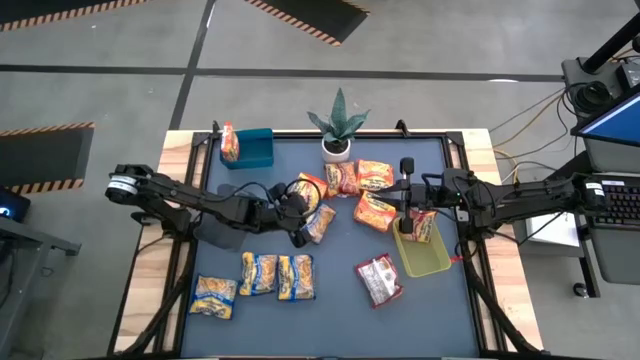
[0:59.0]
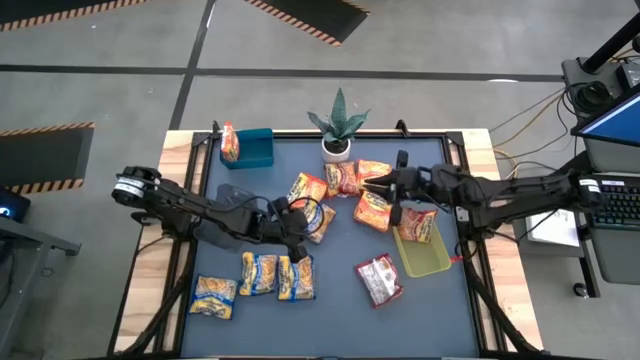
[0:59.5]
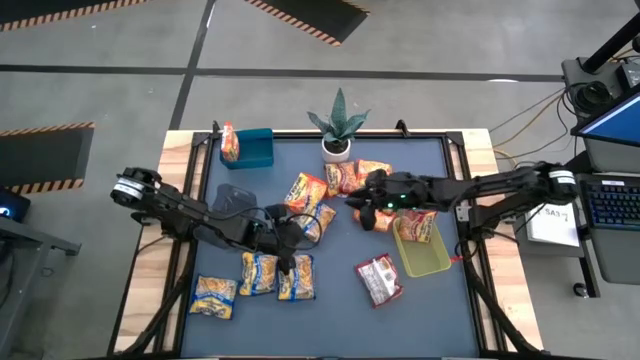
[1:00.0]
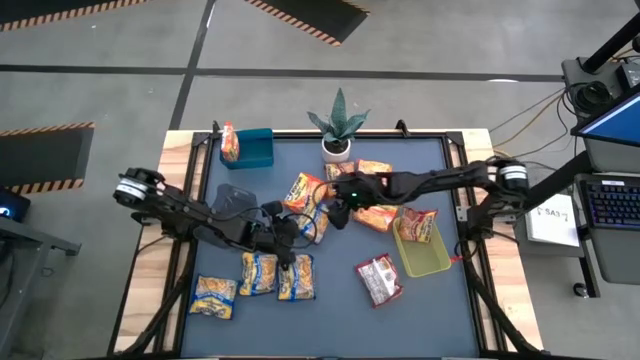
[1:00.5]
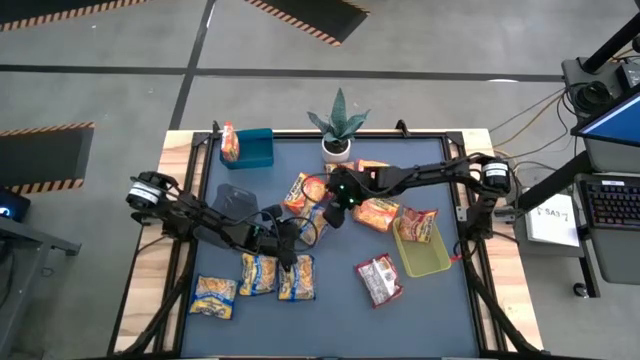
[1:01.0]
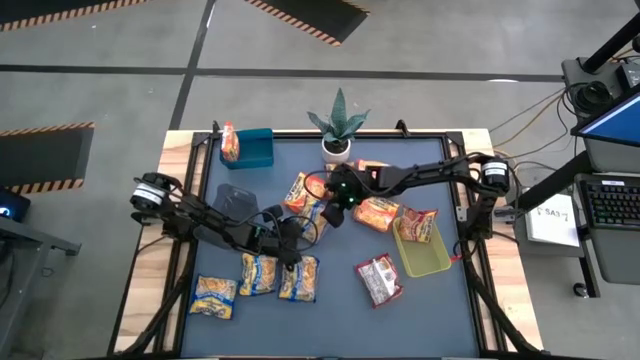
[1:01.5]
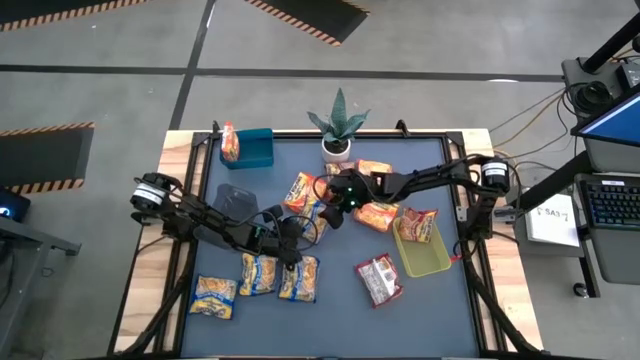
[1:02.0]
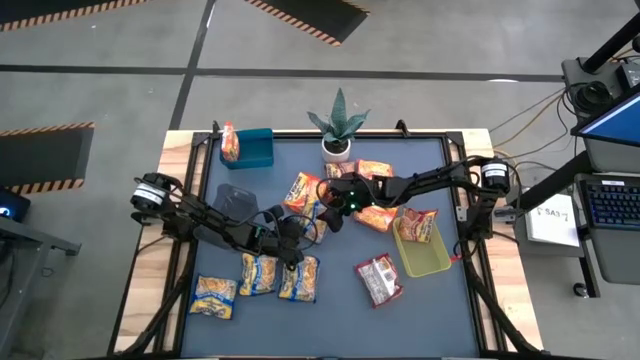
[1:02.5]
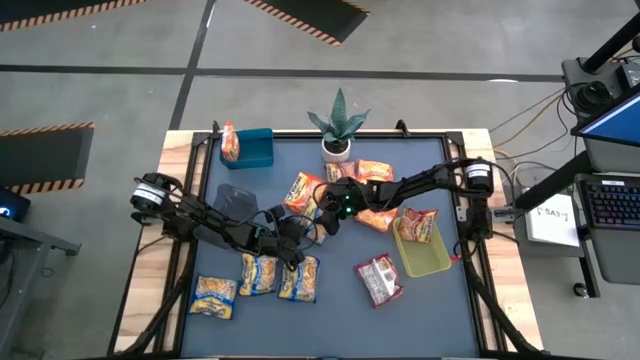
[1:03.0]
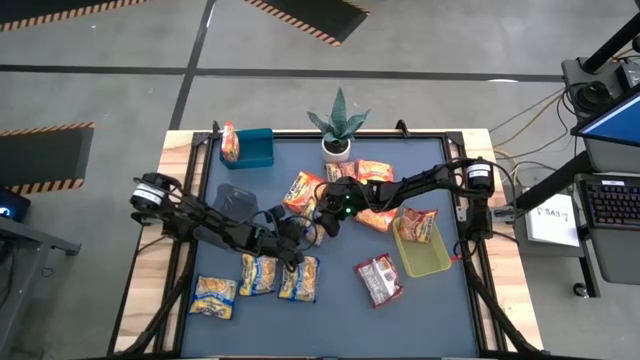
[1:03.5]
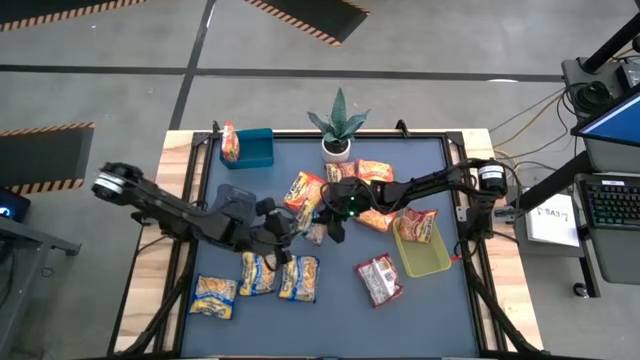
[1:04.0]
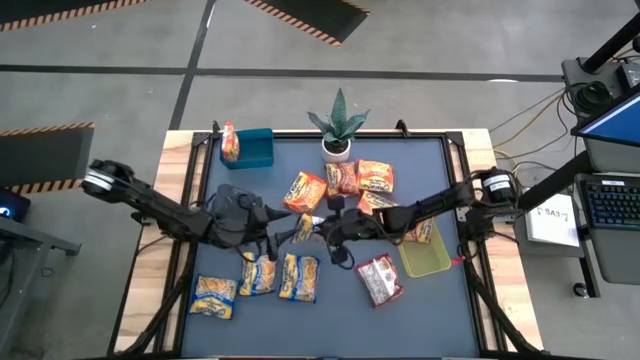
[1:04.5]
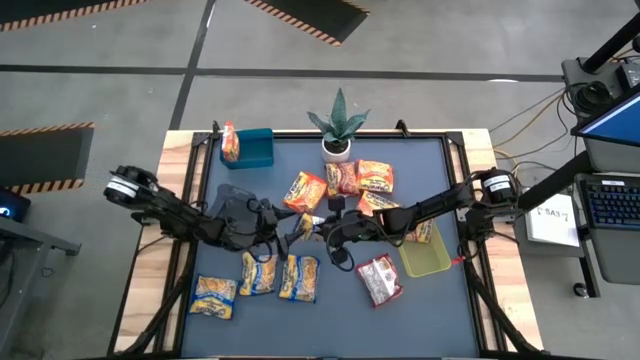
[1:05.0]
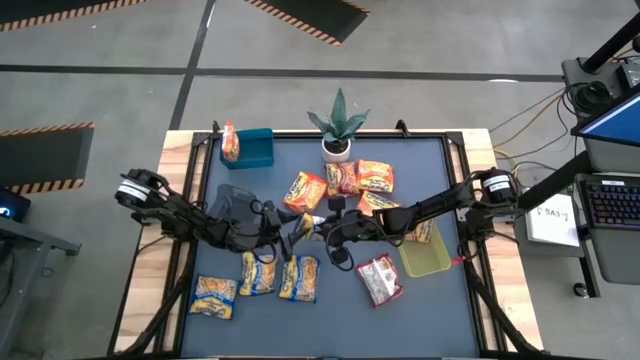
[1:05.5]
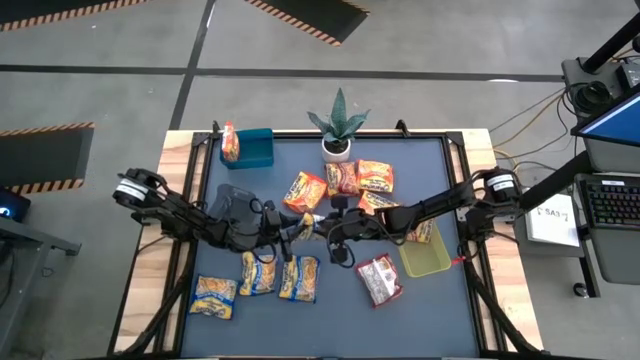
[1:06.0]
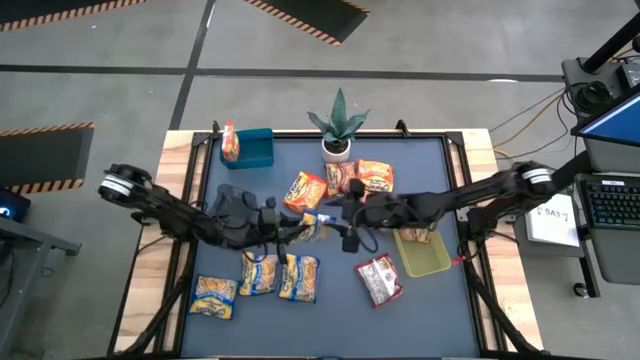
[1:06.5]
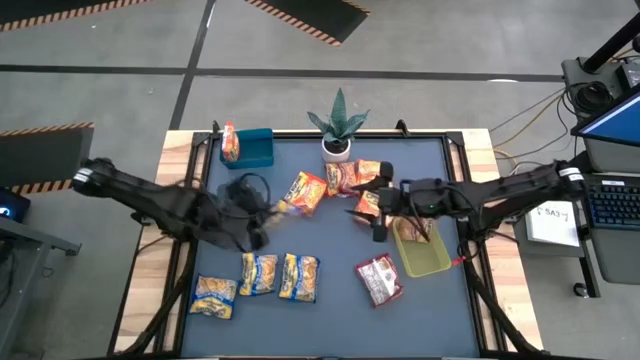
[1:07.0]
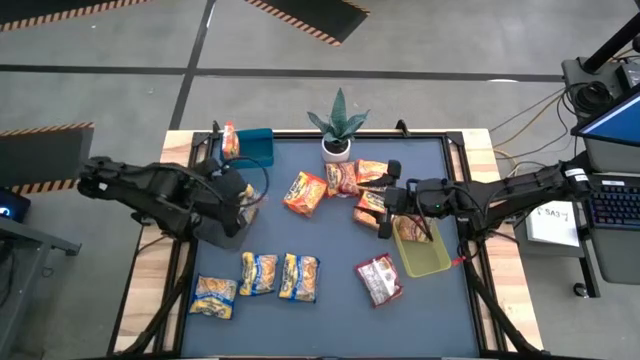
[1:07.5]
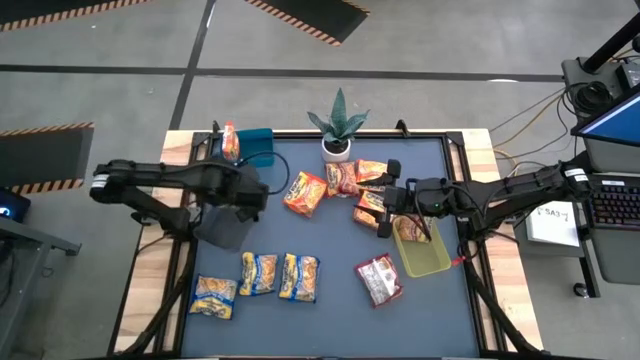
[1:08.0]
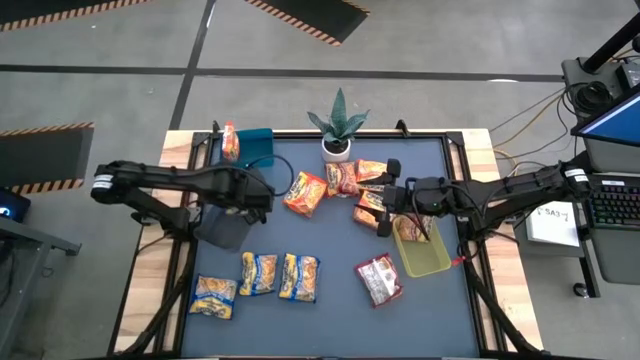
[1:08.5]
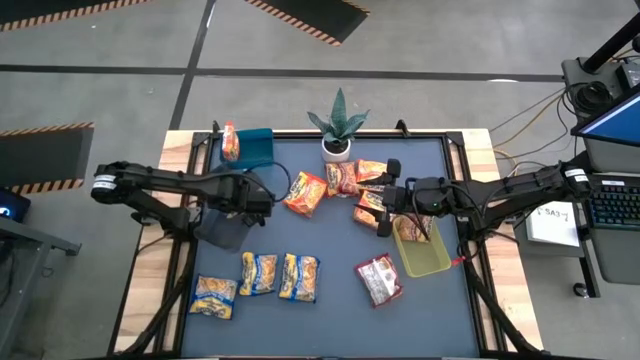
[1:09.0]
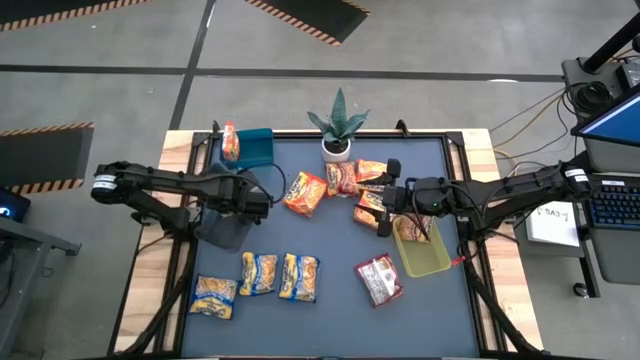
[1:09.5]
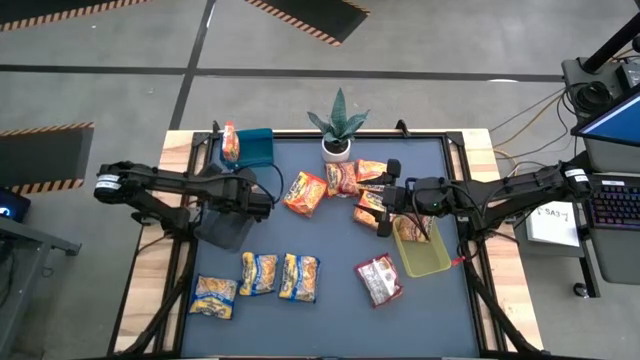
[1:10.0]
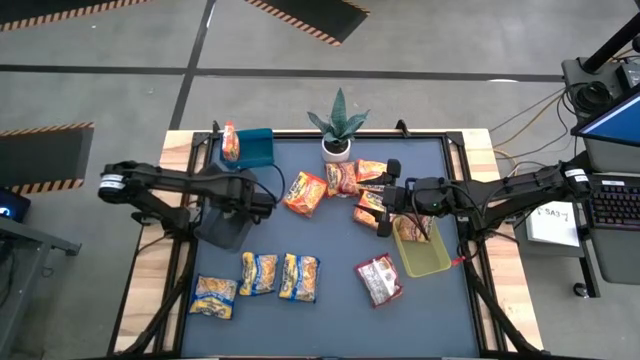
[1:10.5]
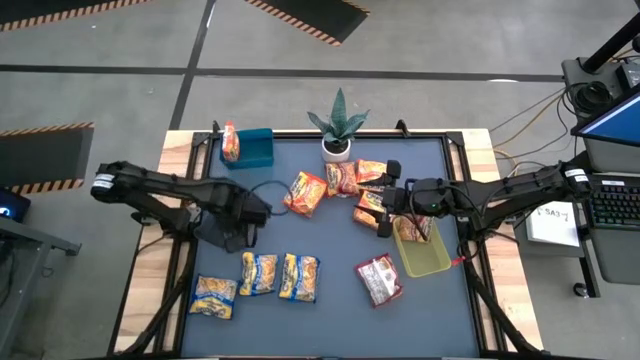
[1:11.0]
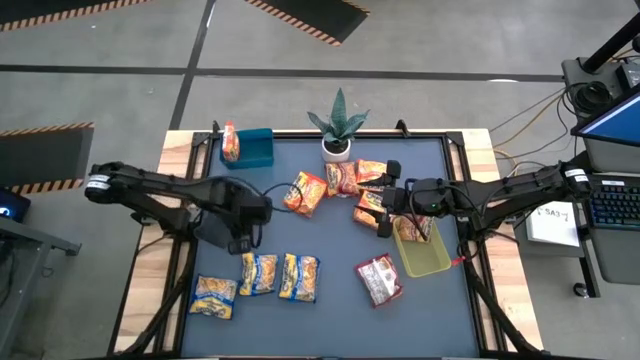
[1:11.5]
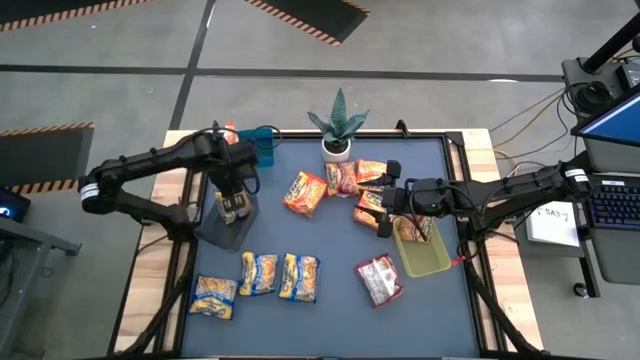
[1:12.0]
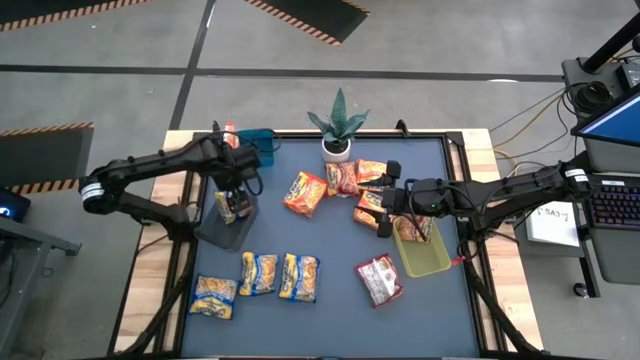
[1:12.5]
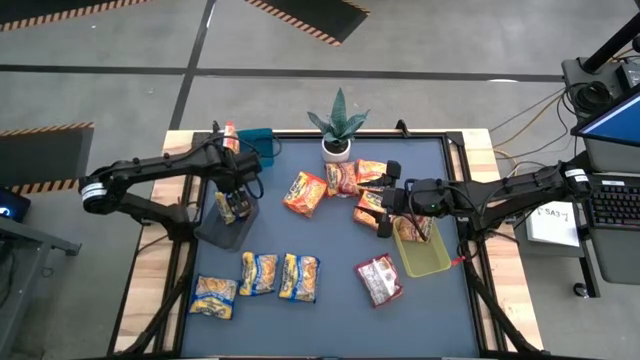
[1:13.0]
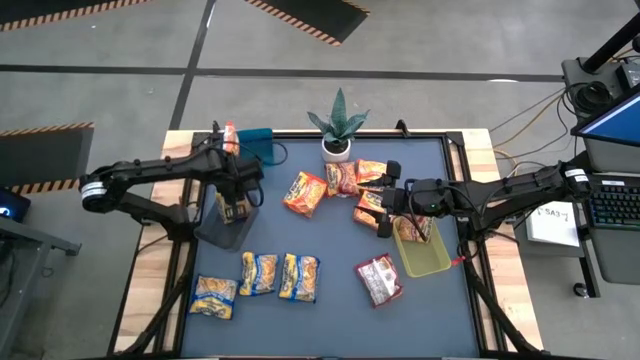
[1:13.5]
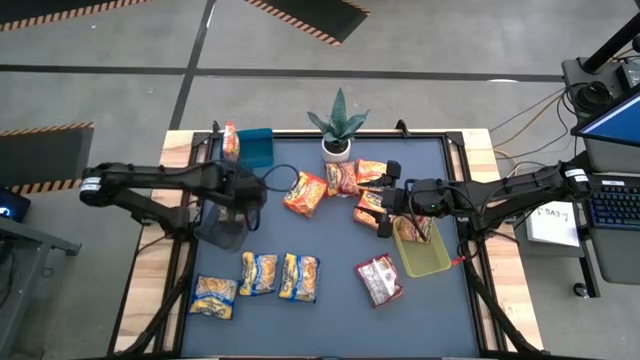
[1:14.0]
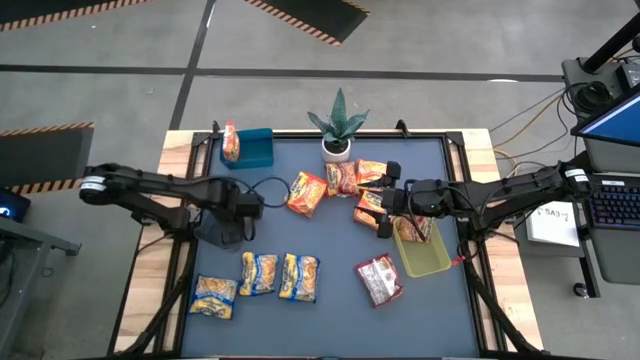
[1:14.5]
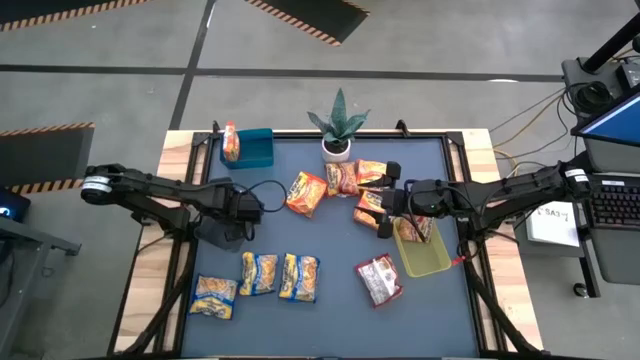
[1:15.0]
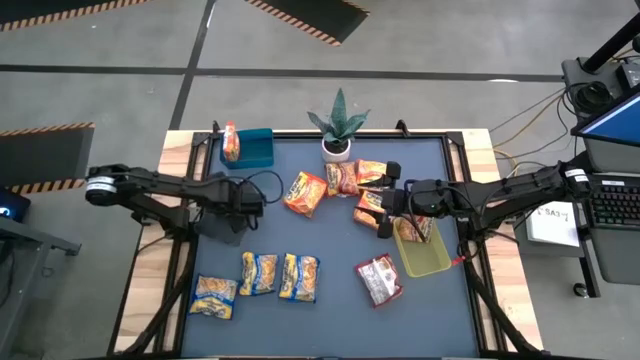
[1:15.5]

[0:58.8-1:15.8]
Task: Sort Maruchan noodles
Put the blue noodle pack into the black bin

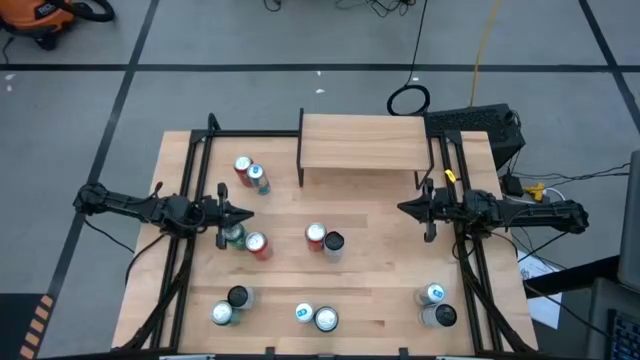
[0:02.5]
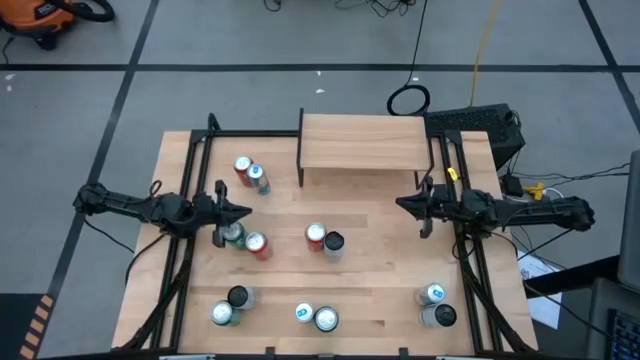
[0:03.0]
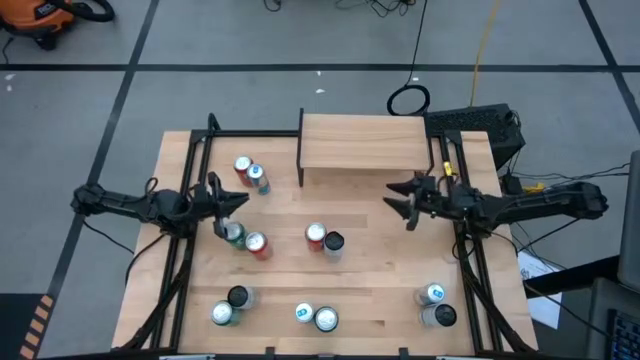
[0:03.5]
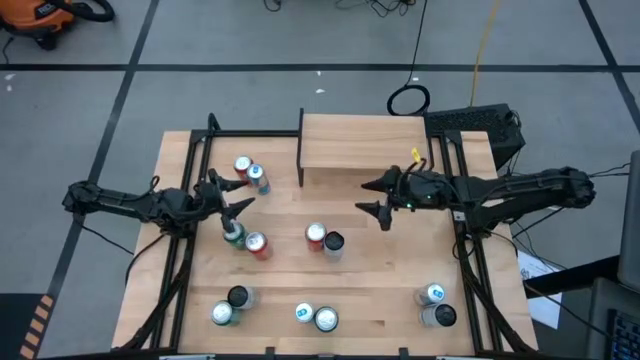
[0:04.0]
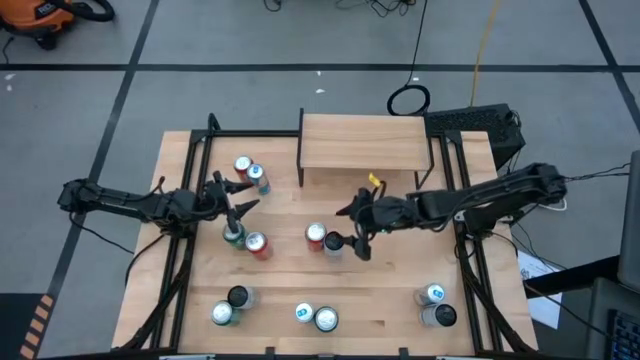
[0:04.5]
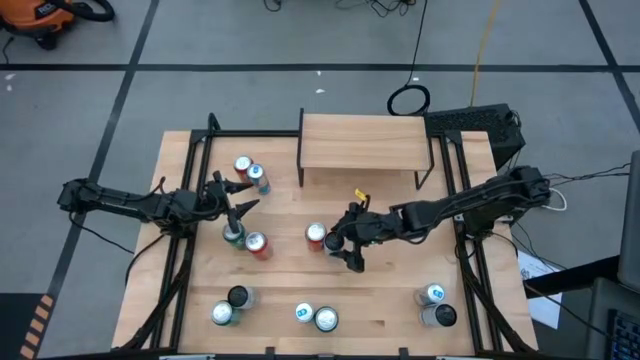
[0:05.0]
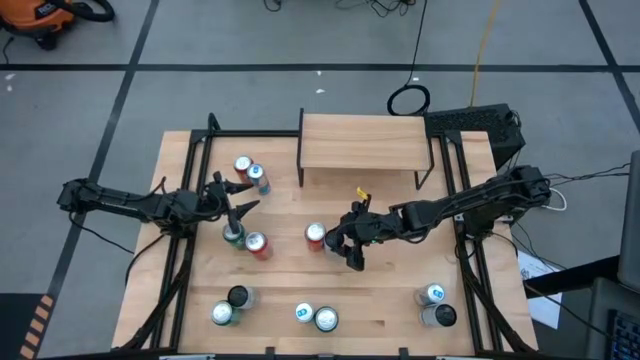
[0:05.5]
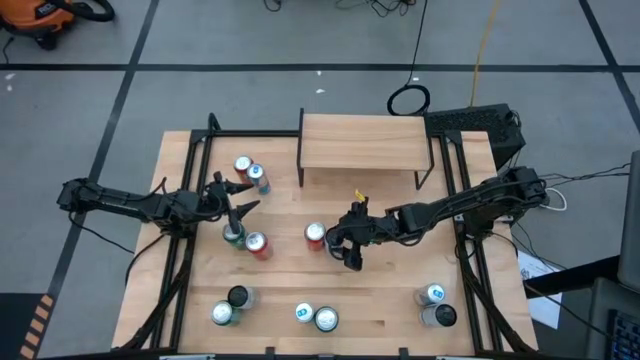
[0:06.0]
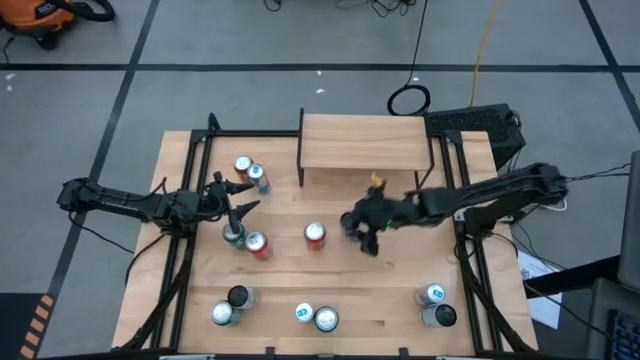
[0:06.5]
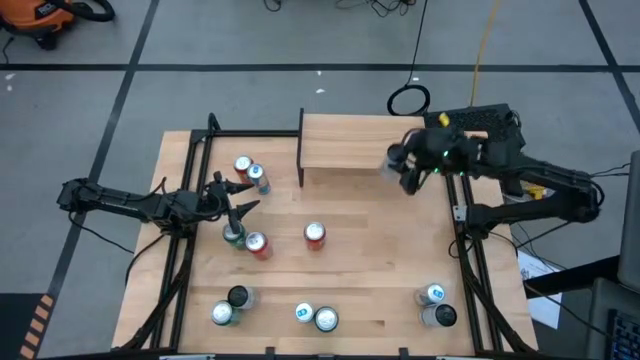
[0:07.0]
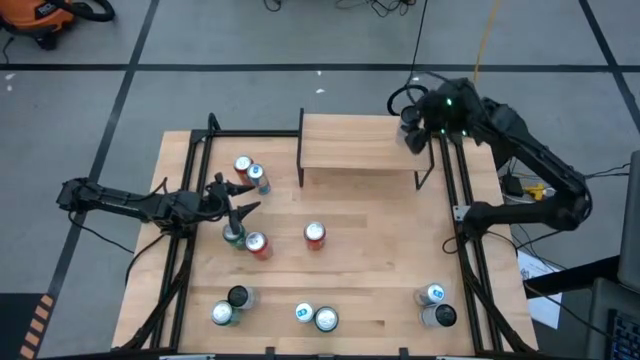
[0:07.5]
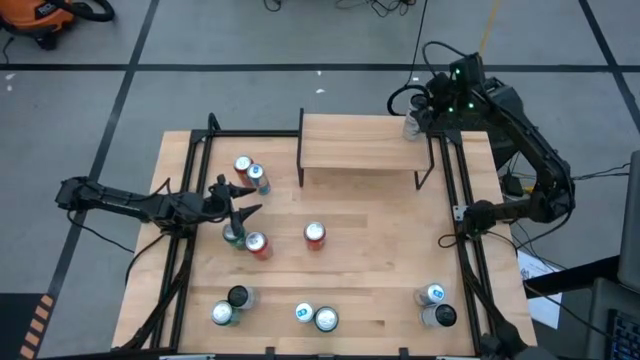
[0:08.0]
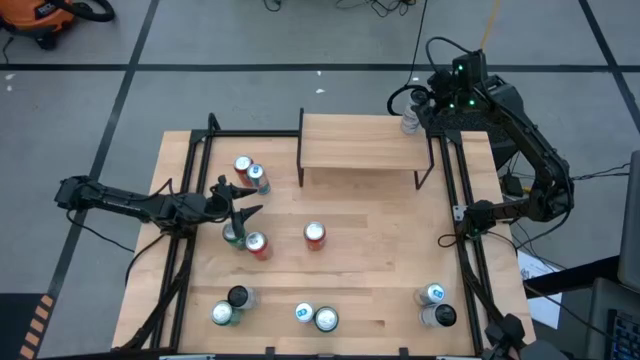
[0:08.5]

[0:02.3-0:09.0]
Task: Place canned beverage on shelf
Put the top white blue soda can on the shelf
